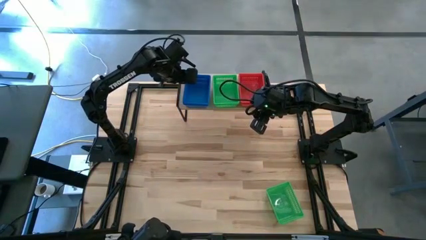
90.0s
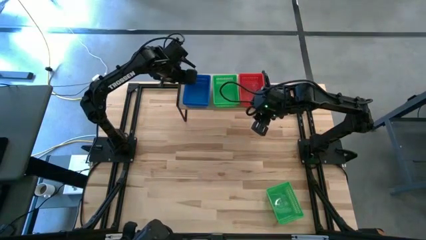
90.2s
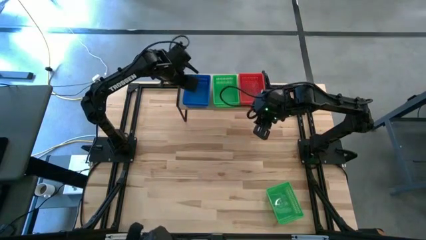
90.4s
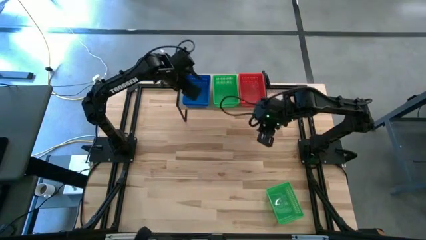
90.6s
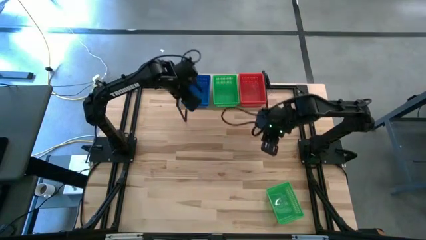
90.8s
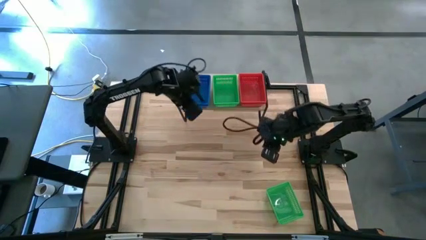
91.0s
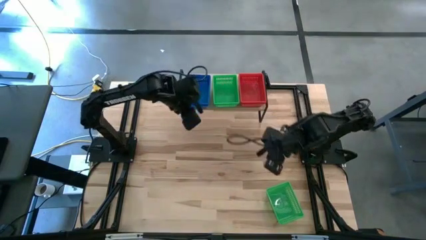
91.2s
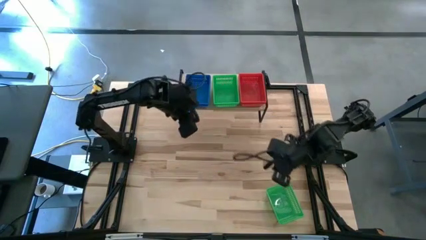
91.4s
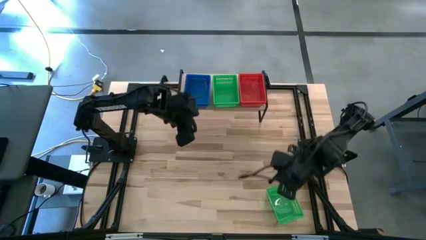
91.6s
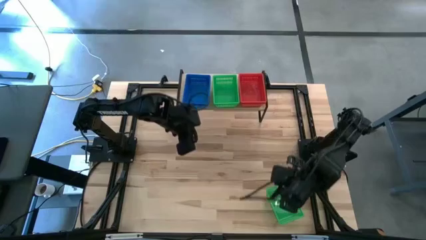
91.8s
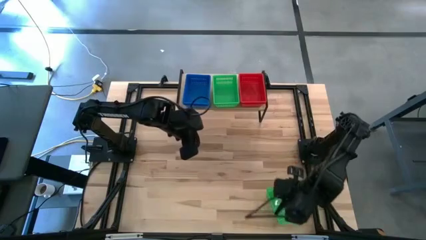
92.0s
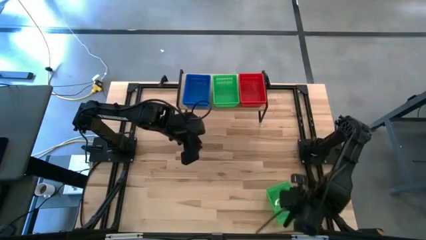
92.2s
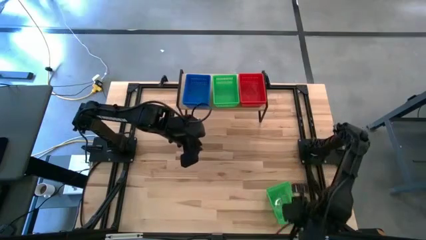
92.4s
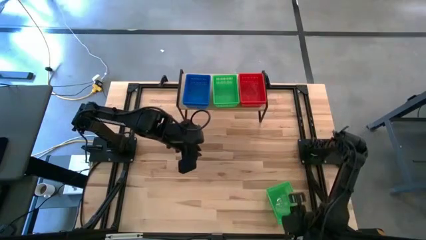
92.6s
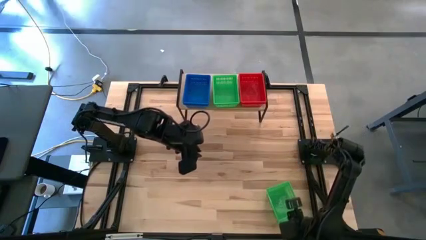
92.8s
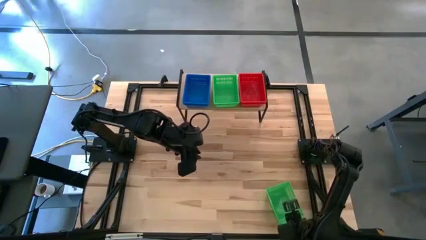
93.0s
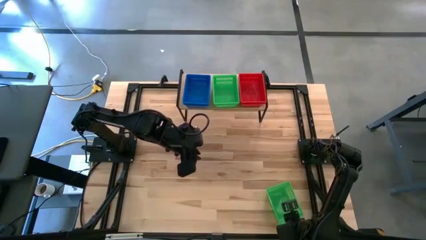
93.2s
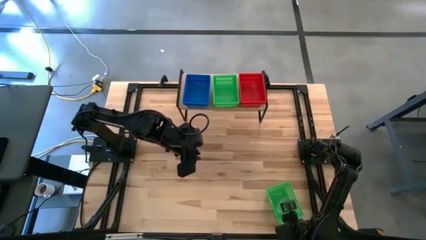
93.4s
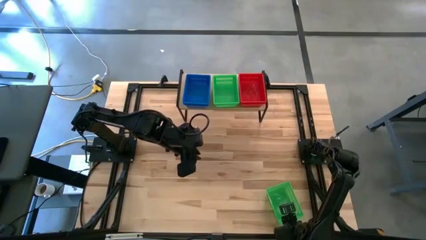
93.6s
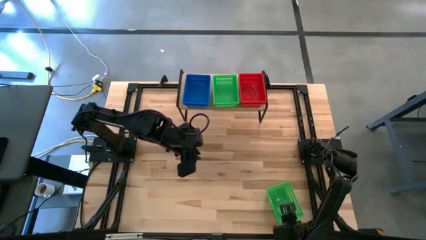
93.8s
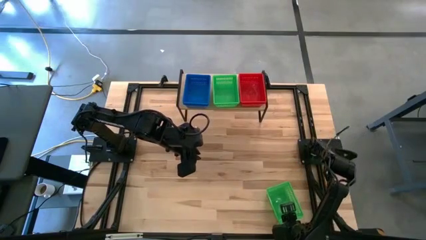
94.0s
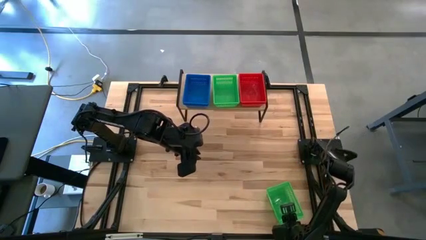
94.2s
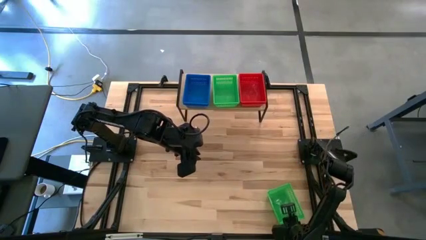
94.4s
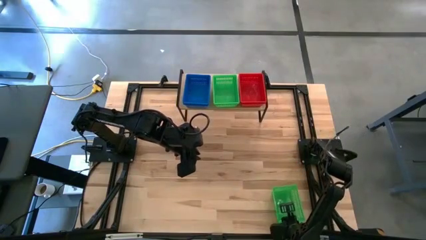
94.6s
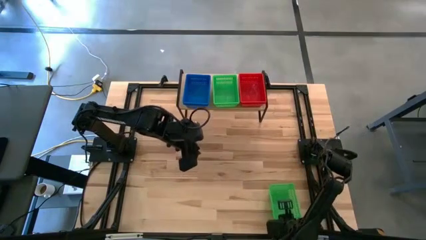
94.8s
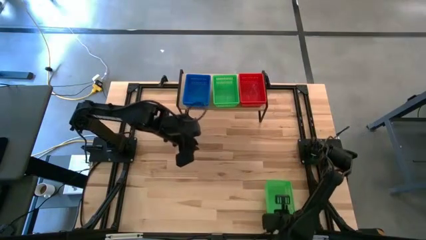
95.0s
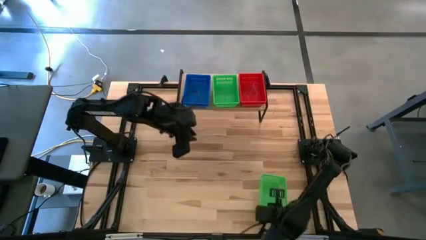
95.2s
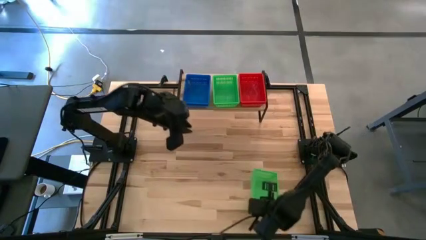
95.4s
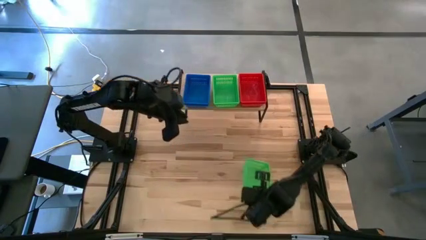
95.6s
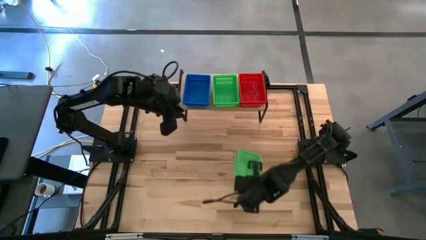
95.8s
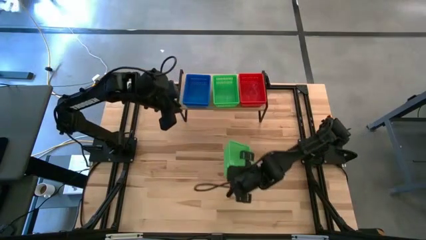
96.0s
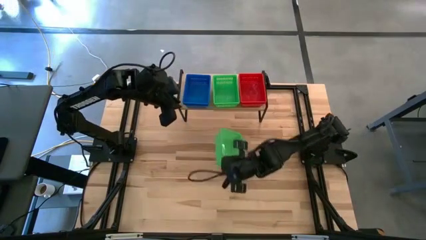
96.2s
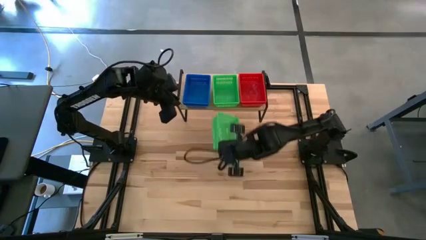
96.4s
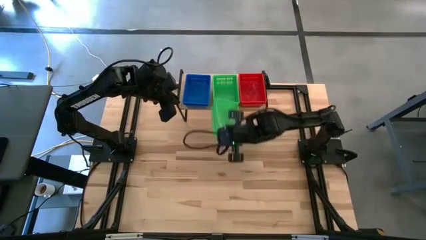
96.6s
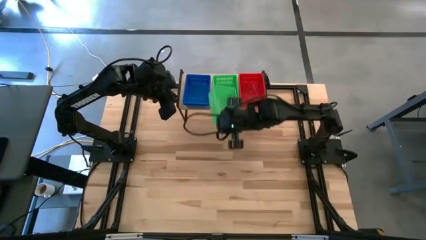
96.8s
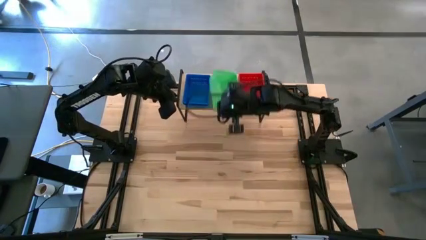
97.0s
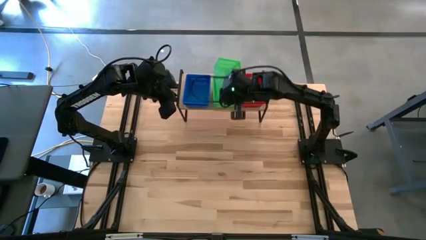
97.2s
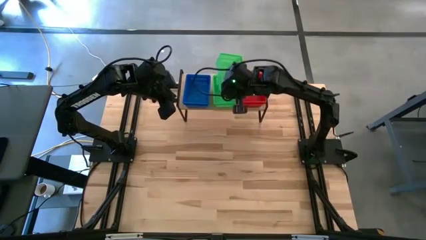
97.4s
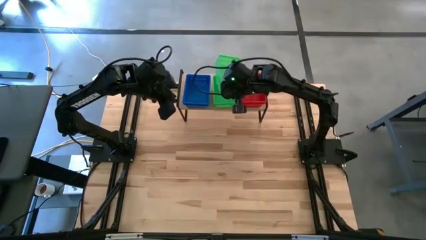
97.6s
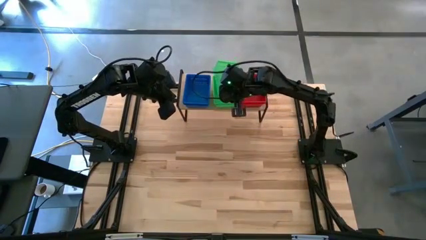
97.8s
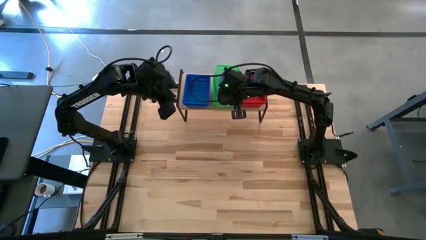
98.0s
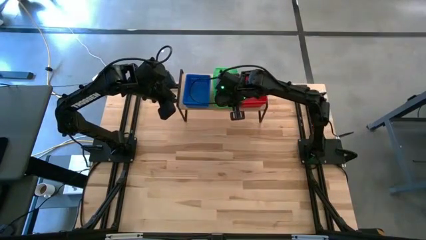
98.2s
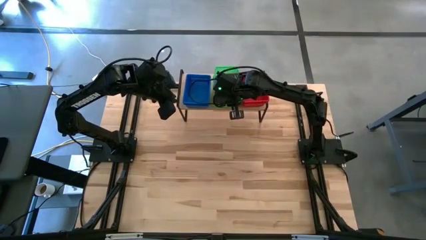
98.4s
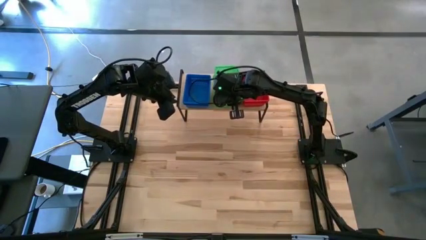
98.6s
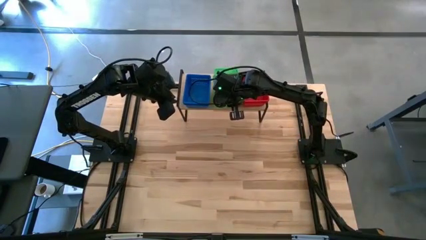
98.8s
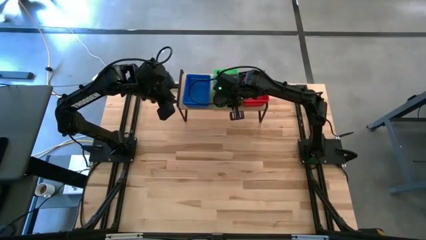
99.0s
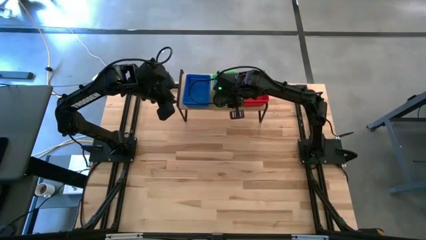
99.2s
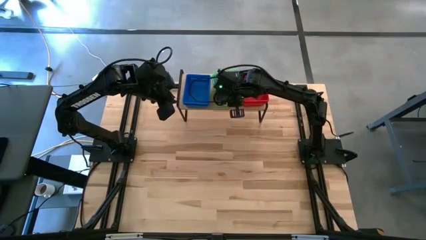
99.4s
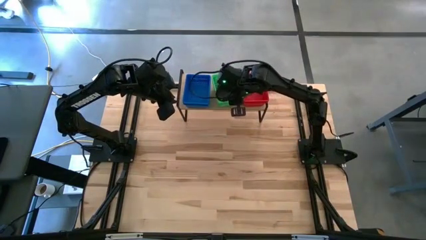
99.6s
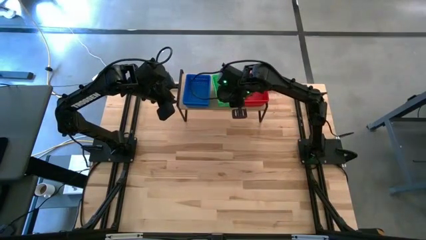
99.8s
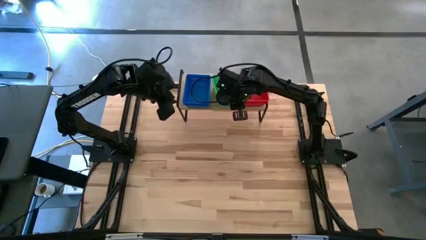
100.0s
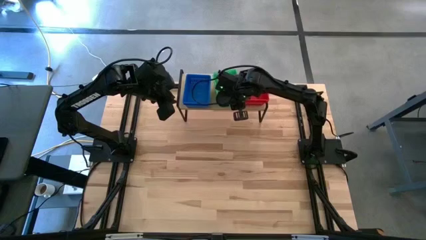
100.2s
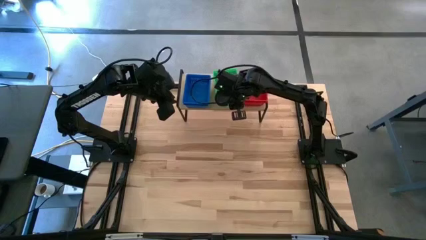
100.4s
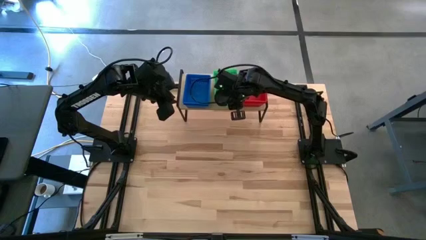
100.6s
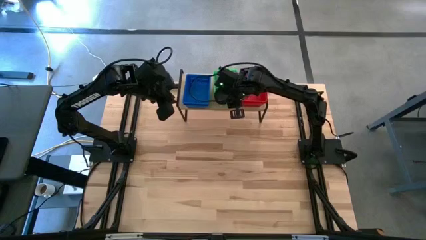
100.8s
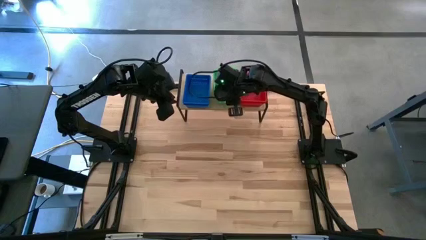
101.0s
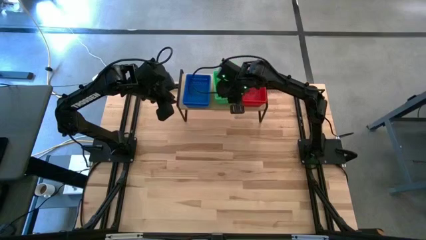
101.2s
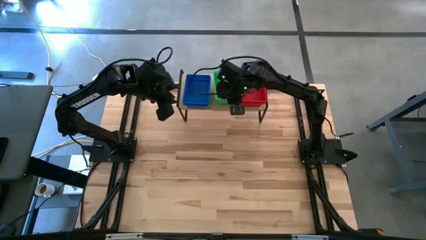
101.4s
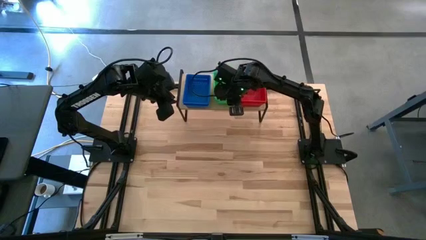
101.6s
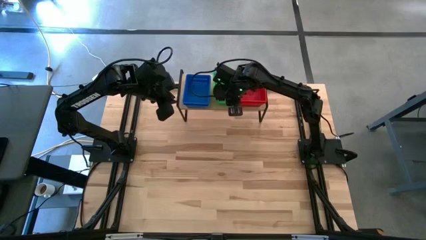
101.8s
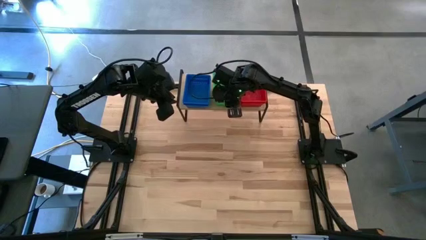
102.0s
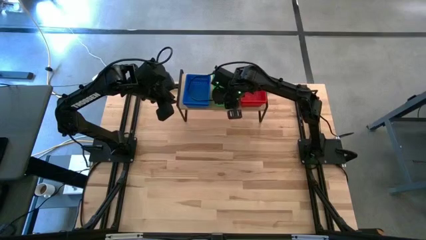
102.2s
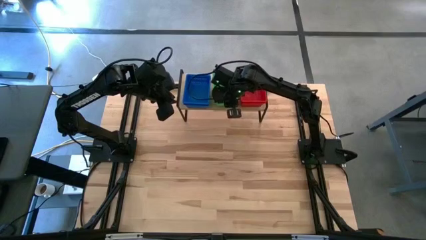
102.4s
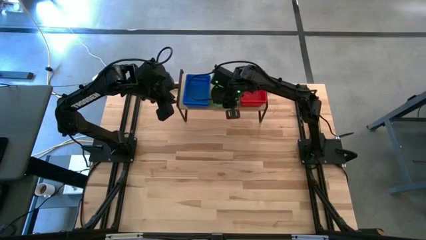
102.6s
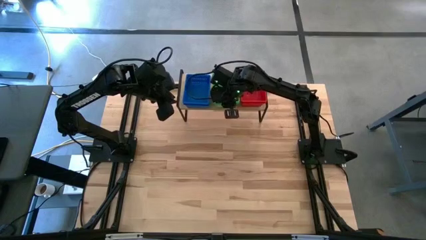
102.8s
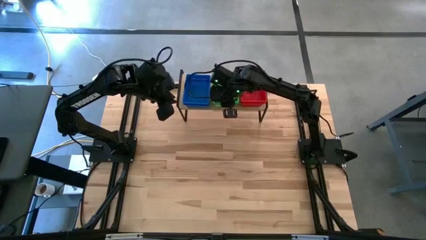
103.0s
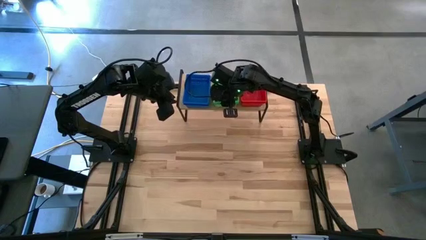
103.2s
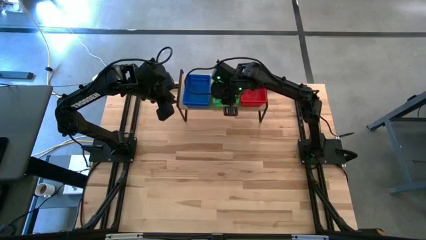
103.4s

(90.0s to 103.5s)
Task: Stack baskets on shelf by color
Stack the green bin on top of the other green bins on the shelf

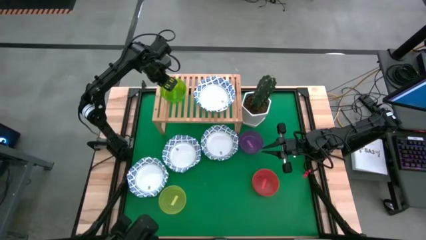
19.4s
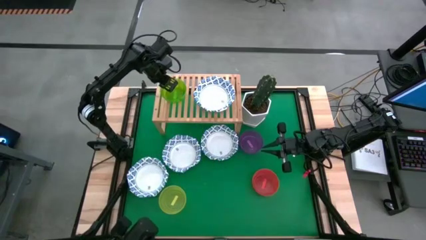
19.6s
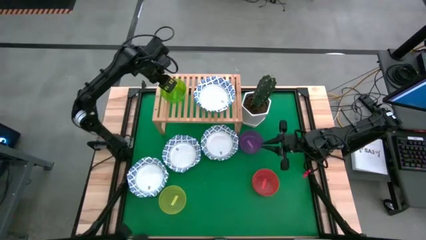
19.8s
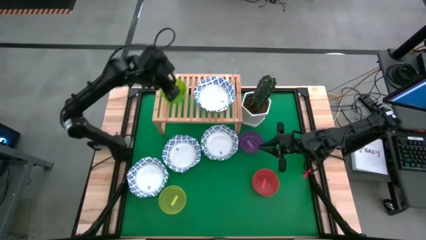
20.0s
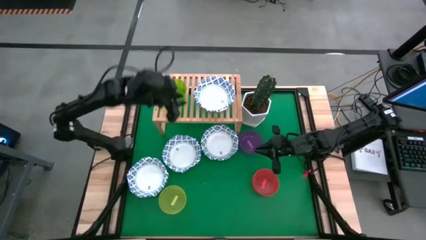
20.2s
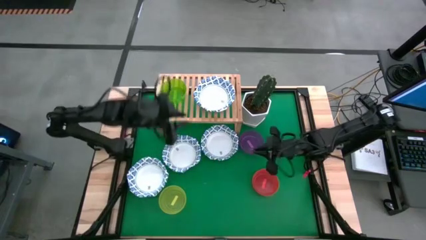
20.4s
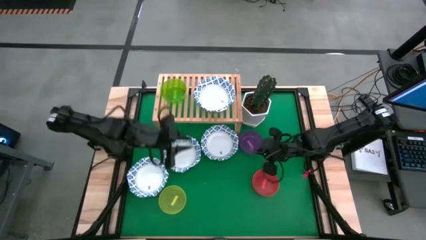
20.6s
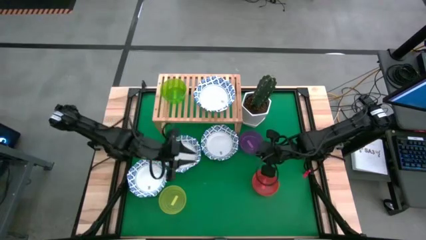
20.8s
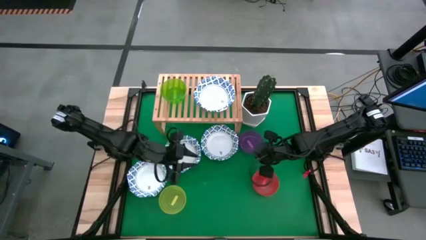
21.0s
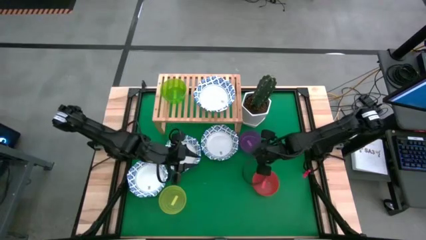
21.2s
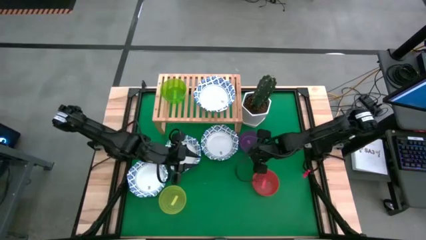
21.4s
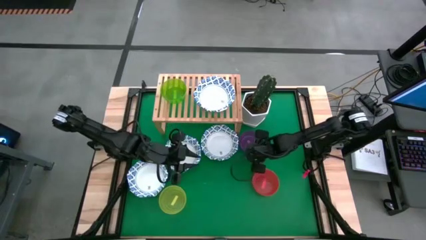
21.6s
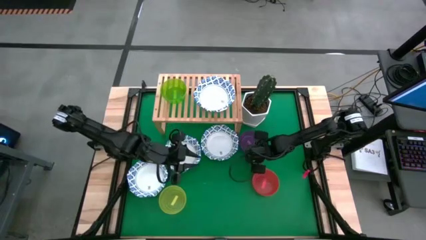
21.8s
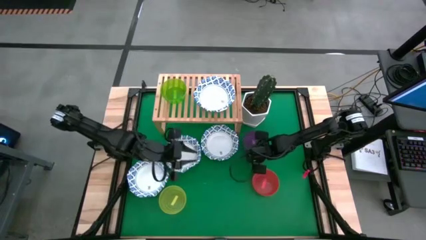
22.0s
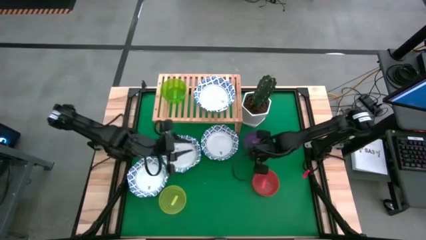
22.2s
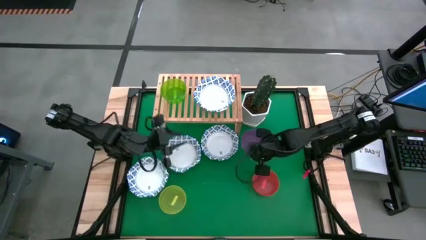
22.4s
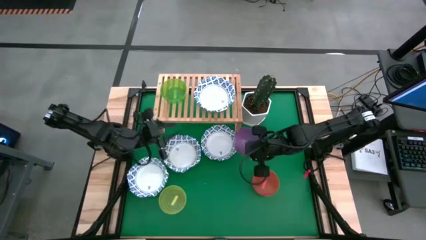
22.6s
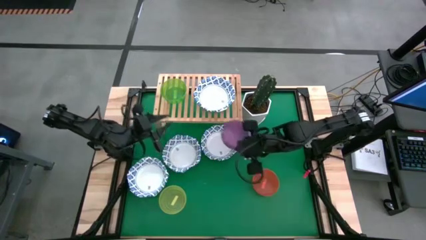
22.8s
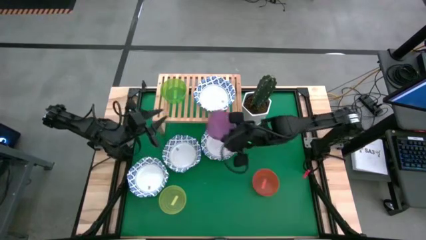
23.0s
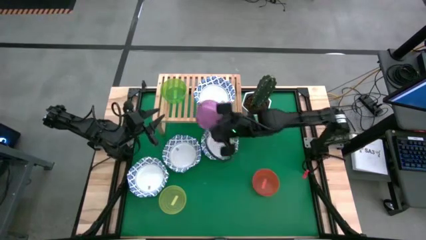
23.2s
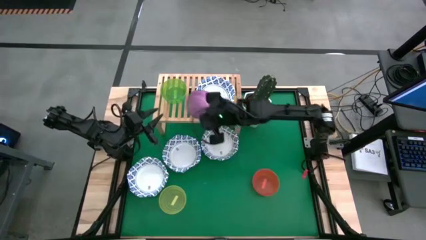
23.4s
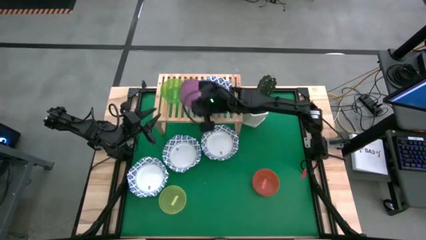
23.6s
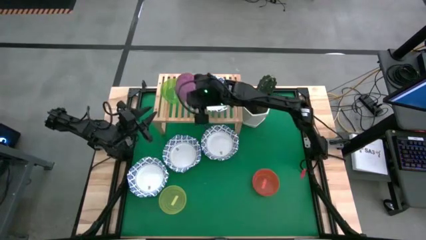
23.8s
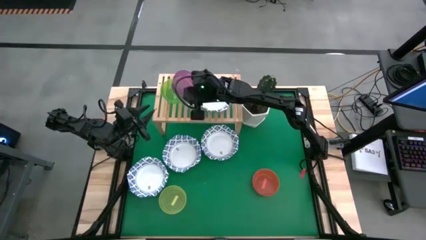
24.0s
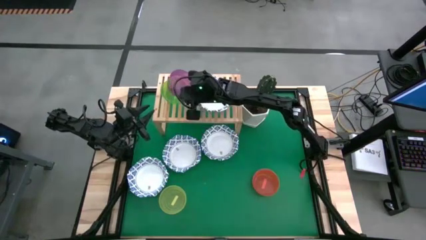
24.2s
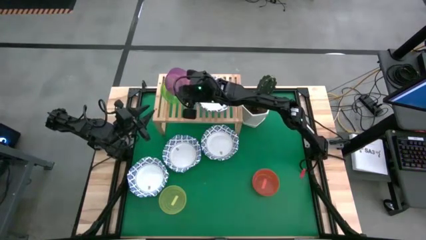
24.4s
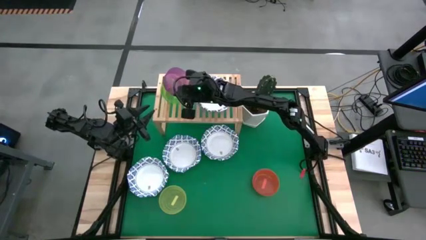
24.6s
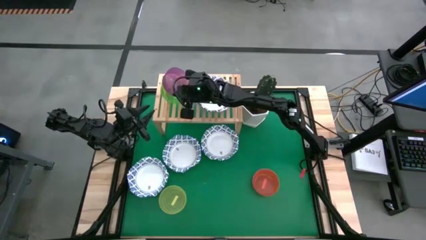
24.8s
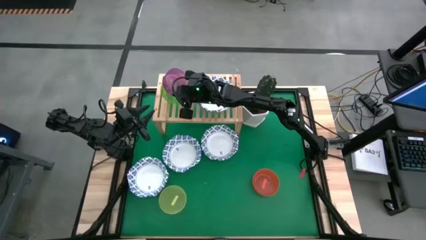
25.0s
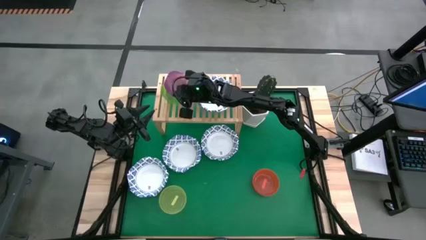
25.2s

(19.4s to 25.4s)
Task: Place and stack bowls onto a shelf
Stack the purple bowl on top of the green bowl on the shelf
